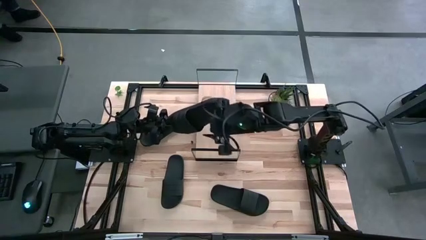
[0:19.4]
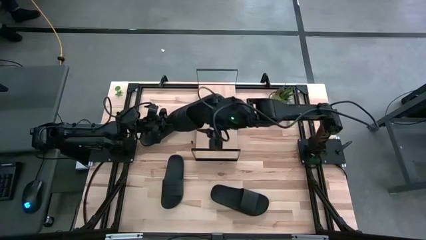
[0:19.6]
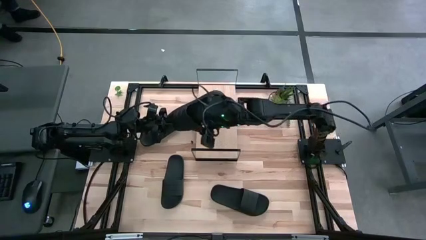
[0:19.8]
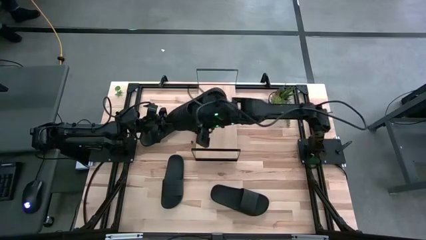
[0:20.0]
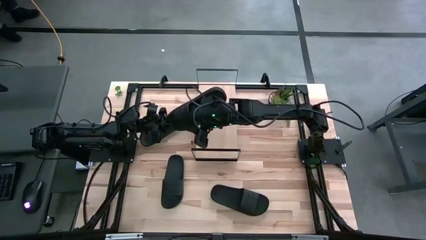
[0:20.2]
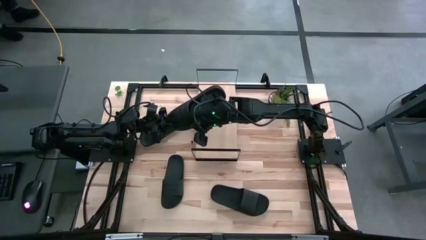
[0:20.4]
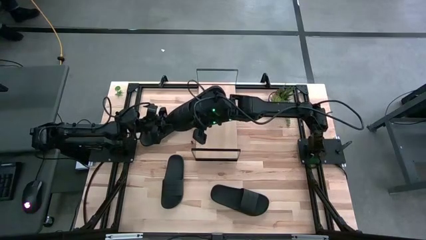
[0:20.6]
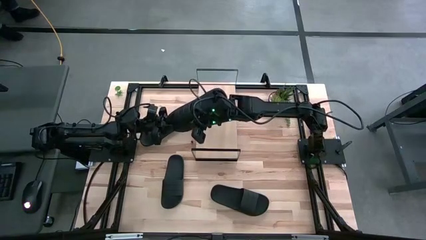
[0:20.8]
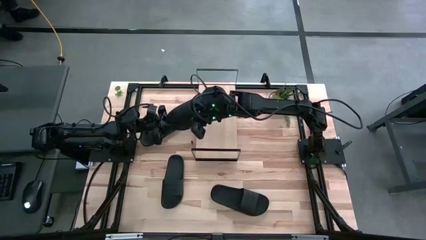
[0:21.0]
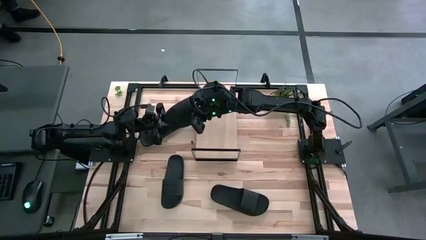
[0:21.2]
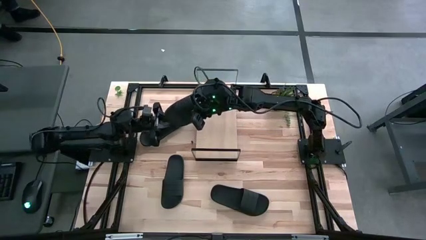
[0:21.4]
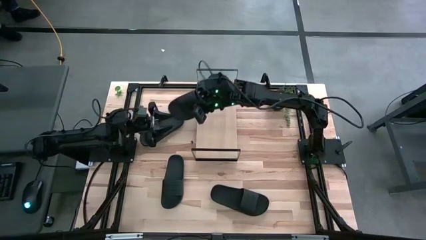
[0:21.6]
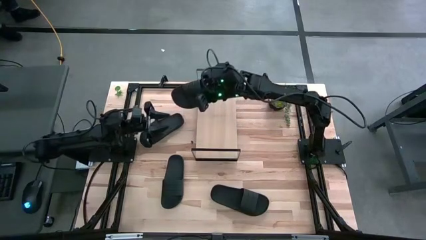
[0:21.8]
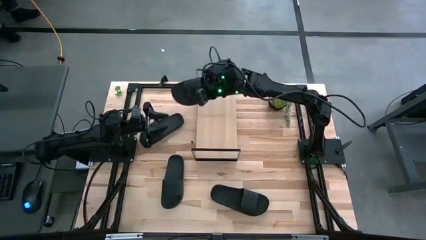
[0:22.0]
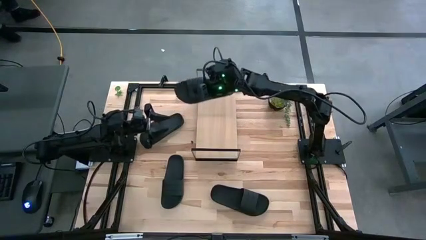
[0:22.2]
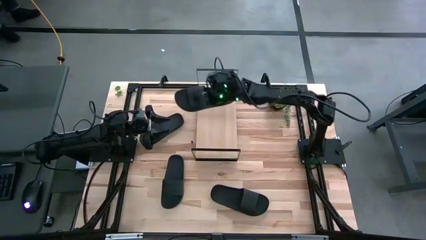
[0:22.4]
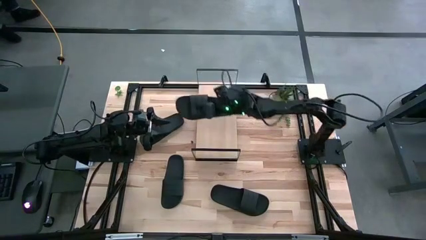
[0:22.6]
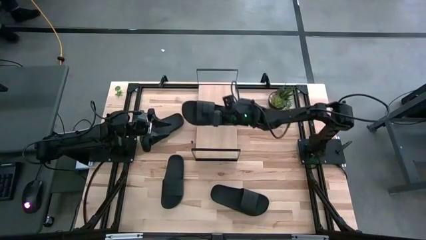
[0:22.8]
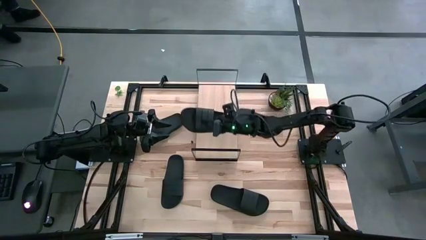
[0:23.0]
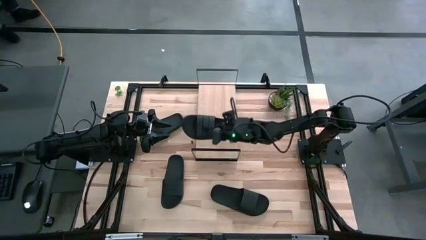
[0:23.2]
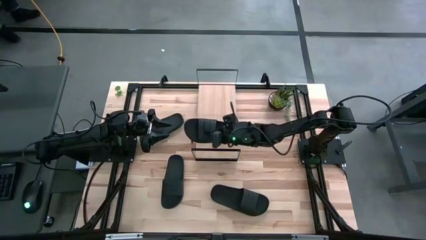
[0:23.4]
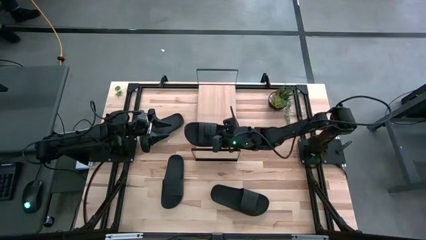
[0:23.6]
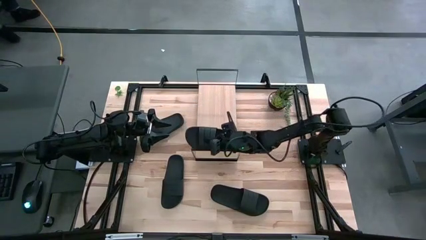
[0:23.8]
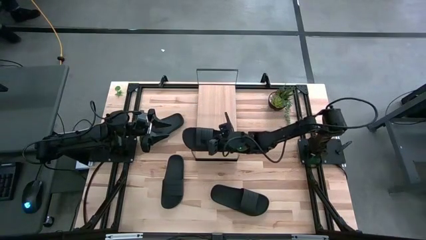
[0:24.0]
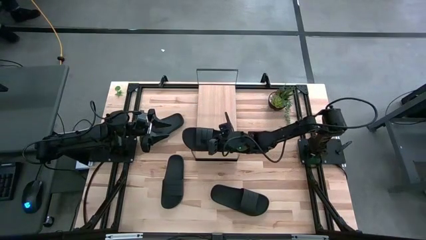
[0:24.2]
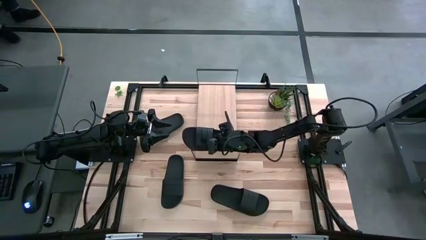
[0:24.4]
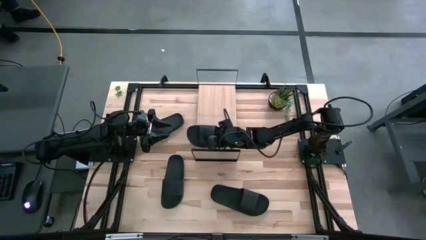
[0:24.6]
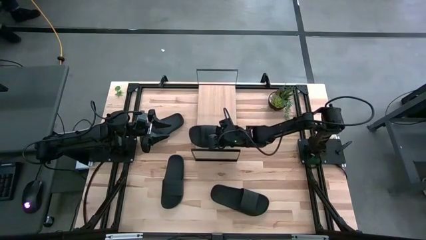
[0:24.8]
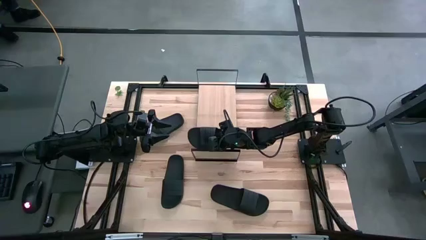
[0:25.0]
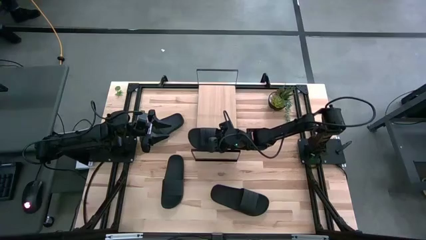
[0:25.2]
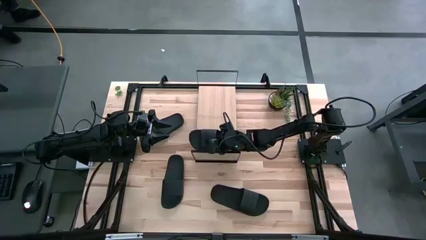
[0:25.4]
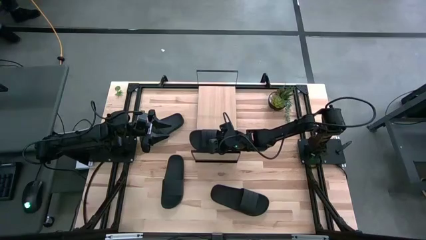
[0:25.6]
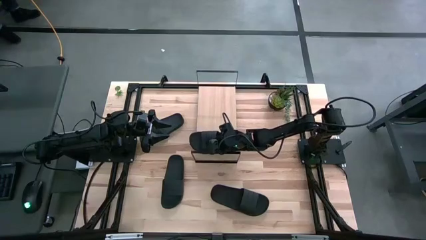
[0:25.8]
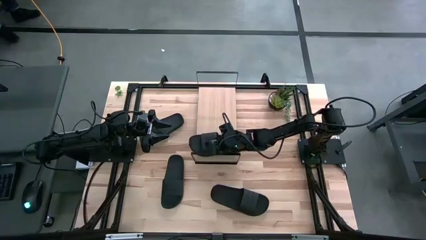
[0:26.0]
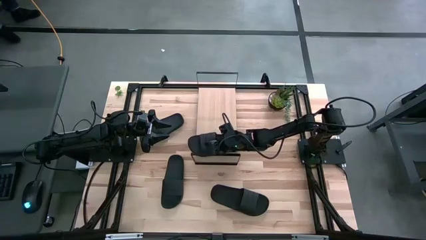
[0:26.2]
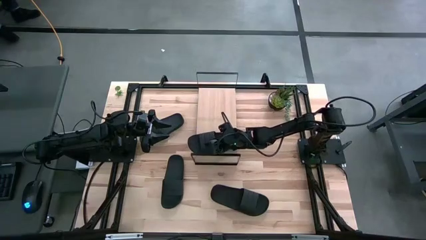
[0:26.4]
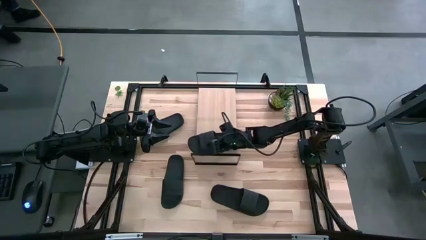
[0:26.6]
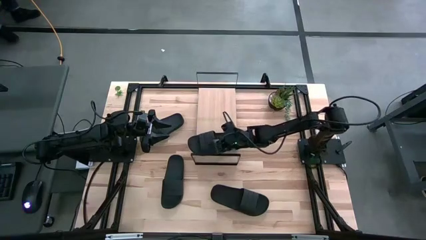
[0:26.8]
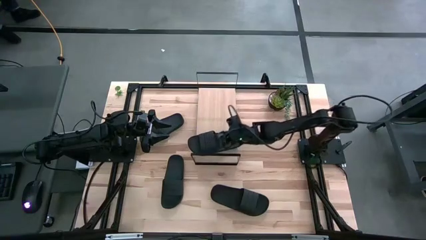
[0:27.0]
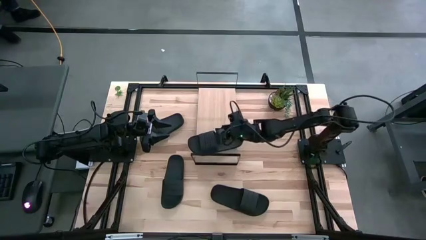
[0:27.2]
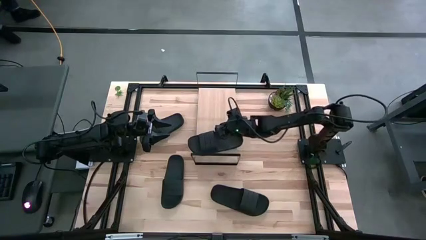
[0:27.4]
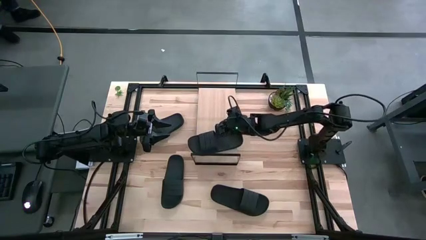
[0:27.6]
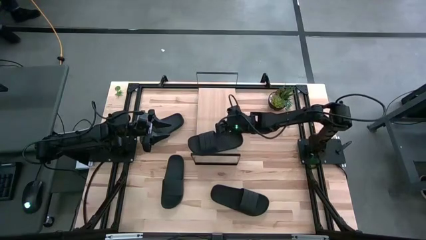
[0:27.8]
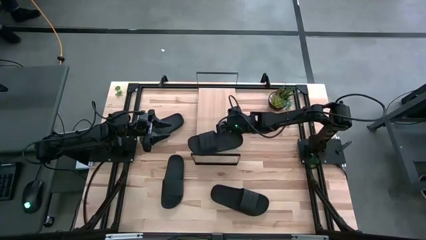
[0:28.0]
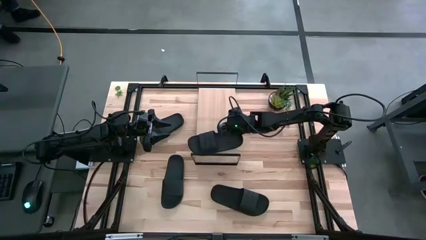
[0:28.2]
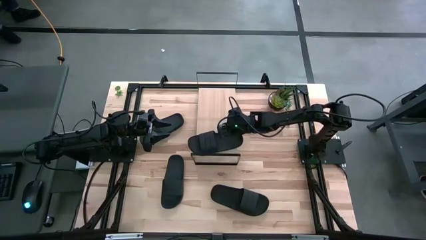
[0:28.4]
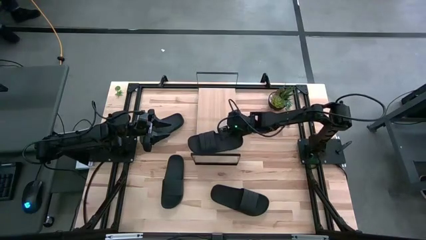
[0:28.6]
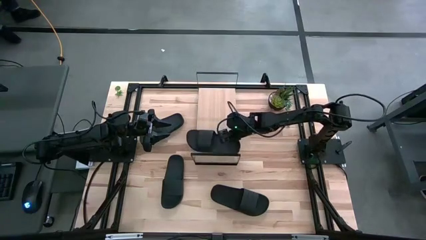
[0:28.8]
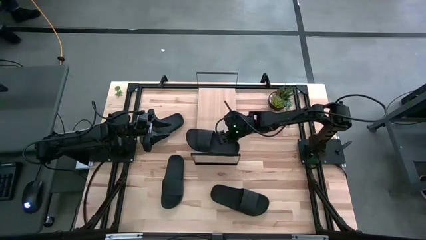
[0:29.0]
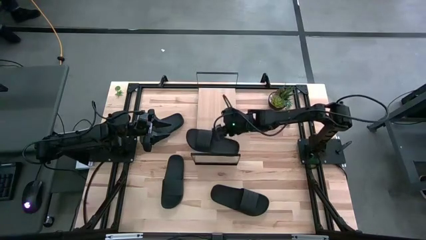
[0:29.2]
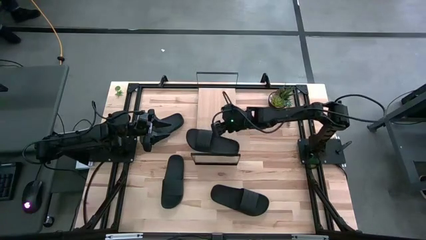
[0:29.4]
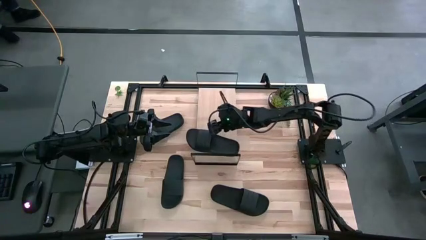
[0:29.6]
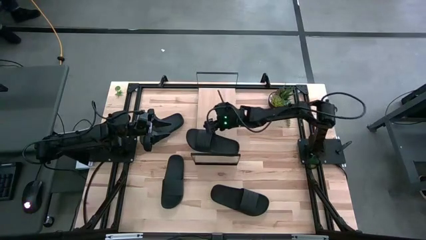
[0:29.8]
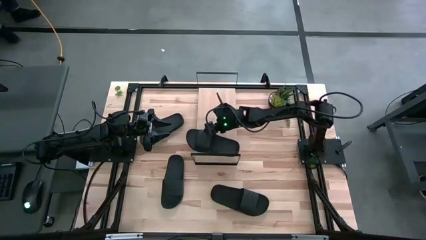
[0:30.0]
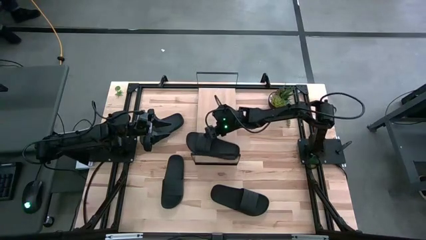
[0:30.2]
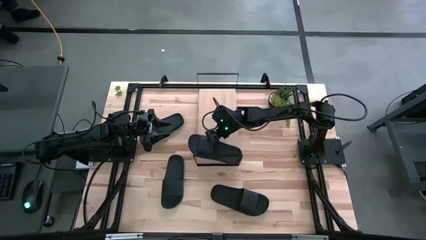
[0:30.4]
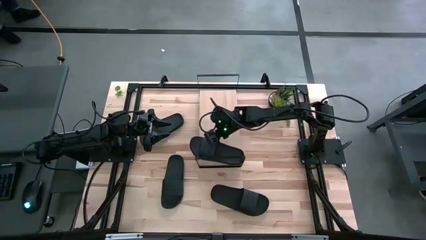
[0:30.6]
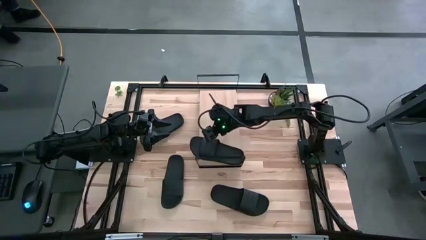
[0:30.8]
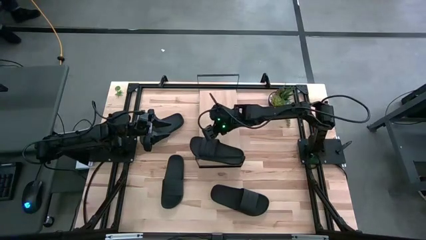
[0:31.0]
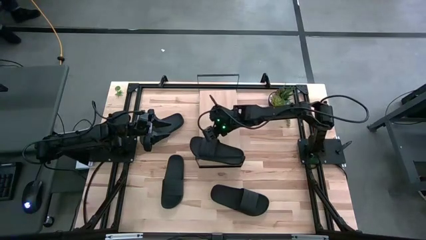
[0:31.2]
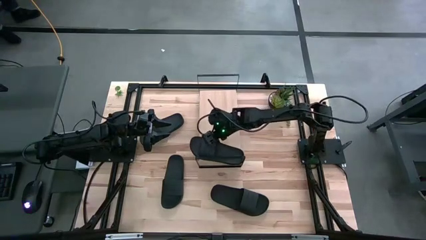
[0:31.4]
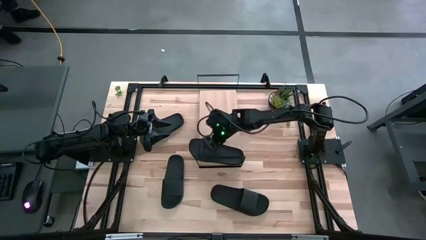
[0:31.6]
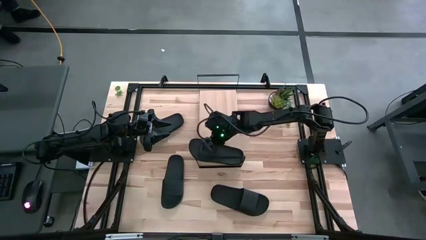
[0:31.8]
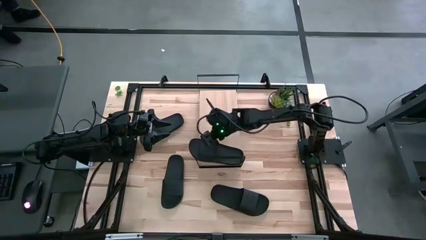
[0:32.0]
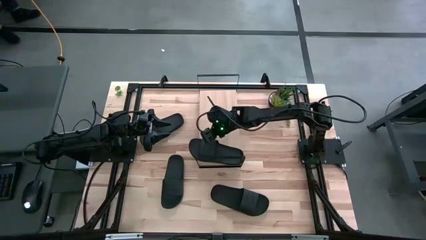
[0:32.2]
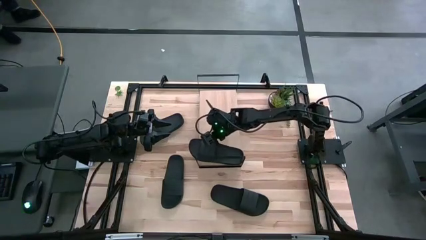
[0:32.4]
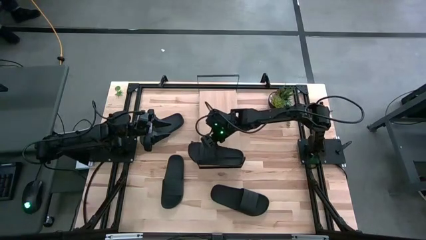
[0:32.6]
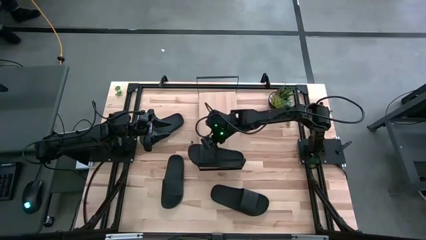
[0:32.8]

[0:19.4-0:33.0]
Task: Pick and place slides into the shelf
Put the top right black slipper on the shelf
